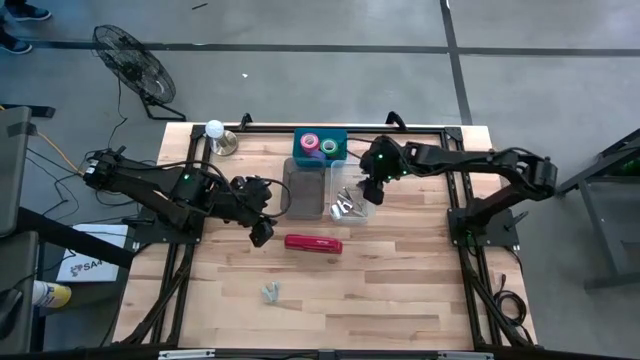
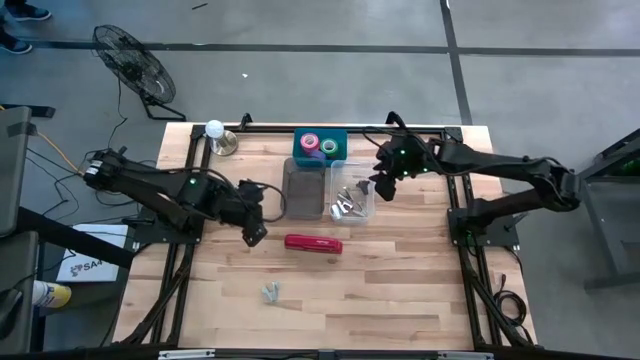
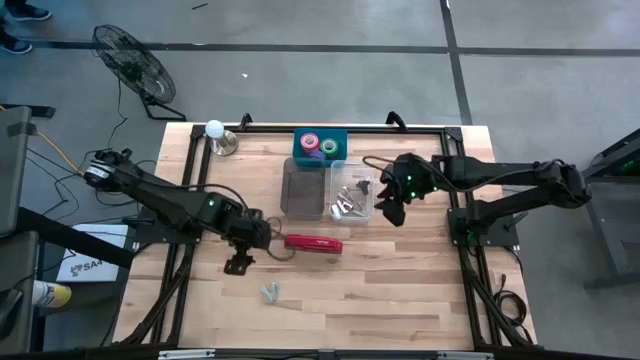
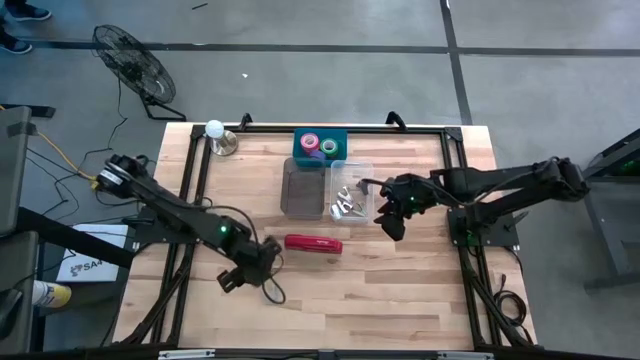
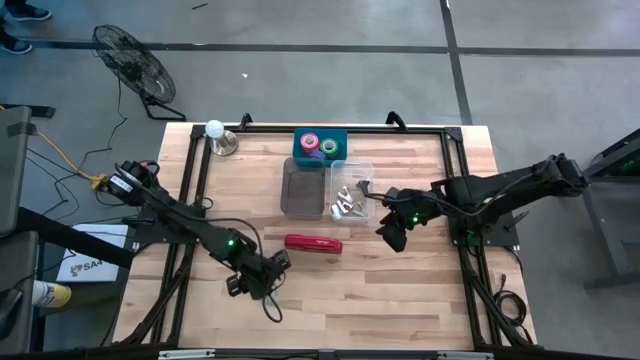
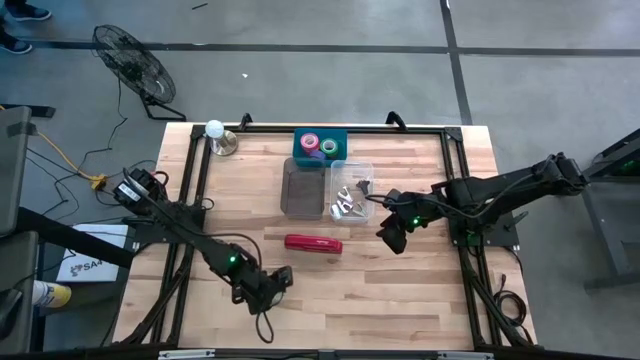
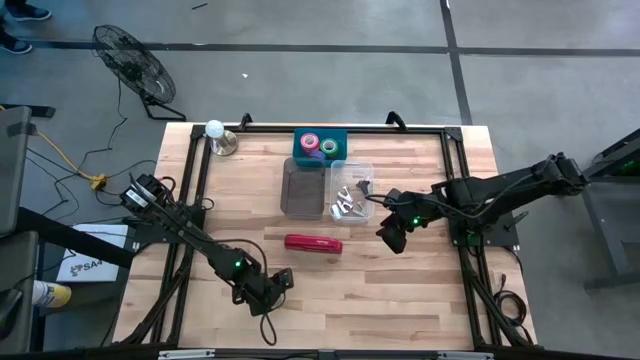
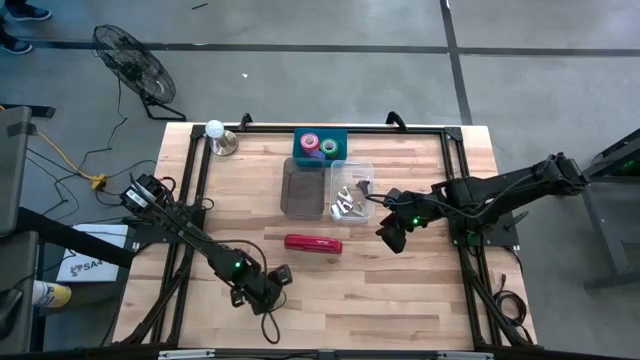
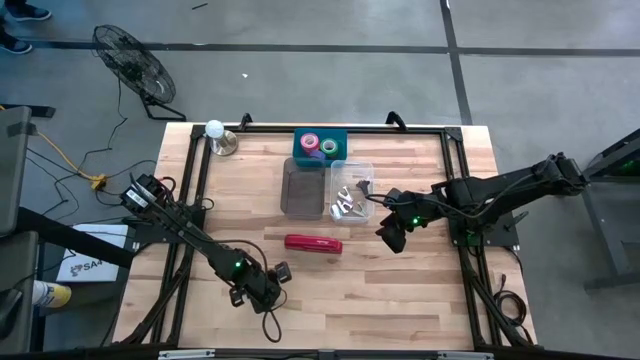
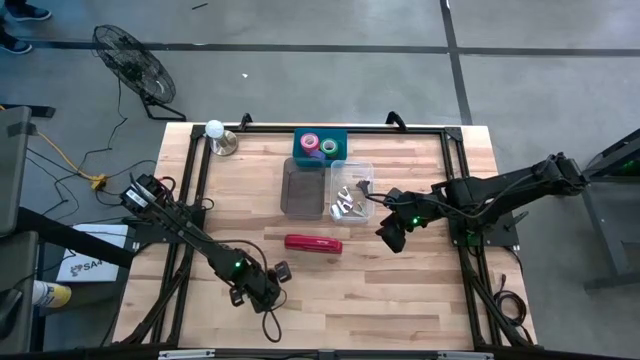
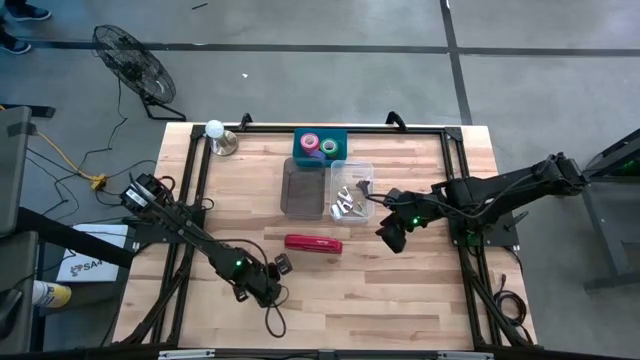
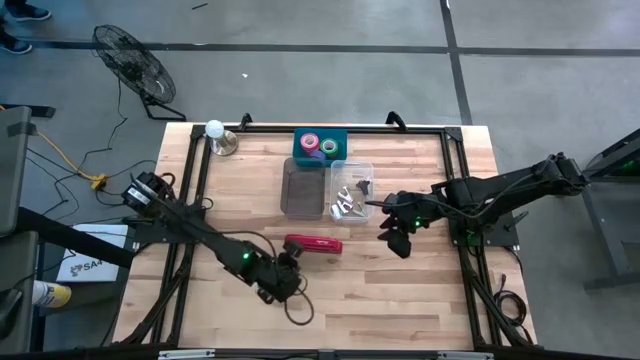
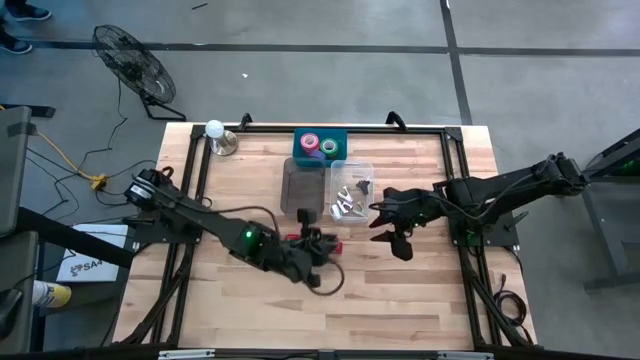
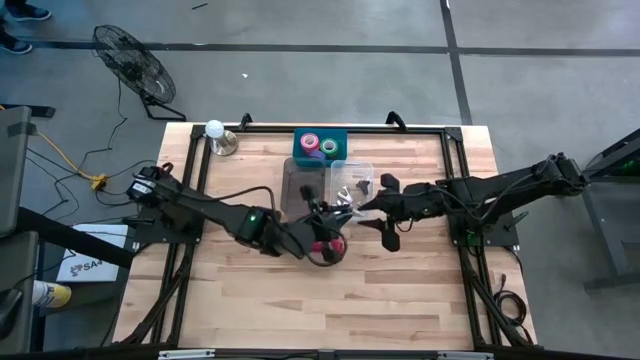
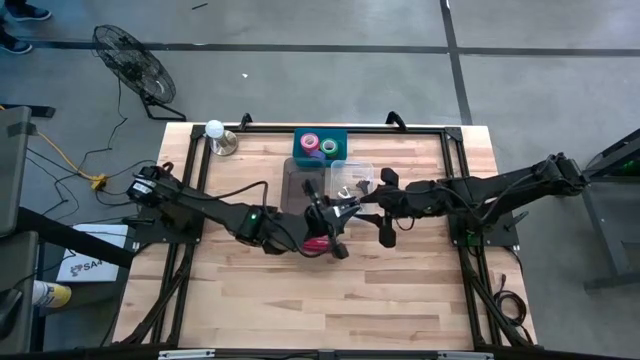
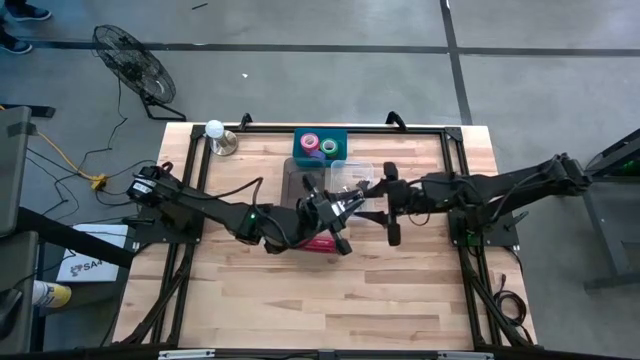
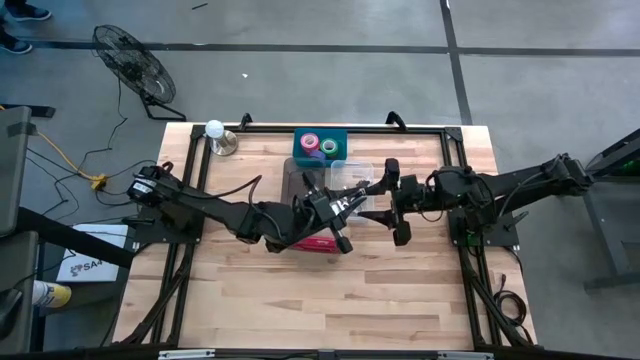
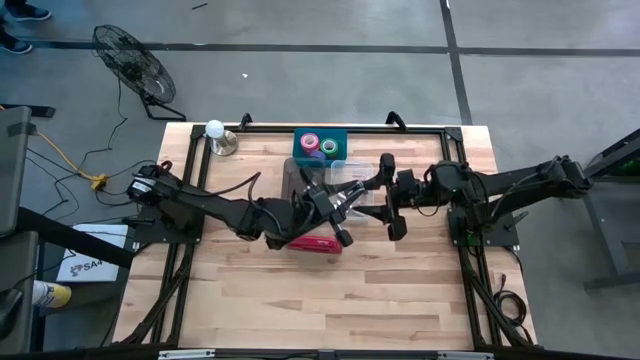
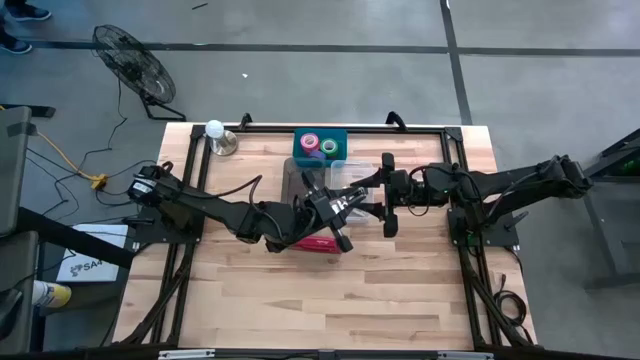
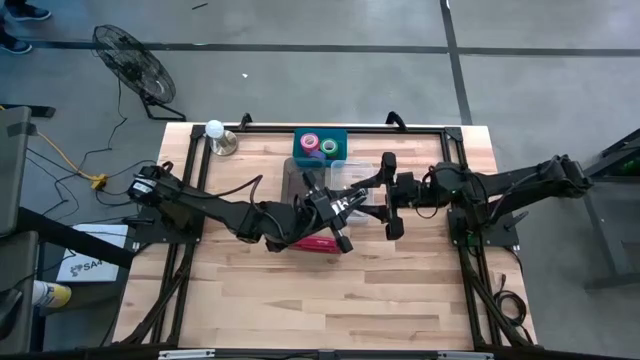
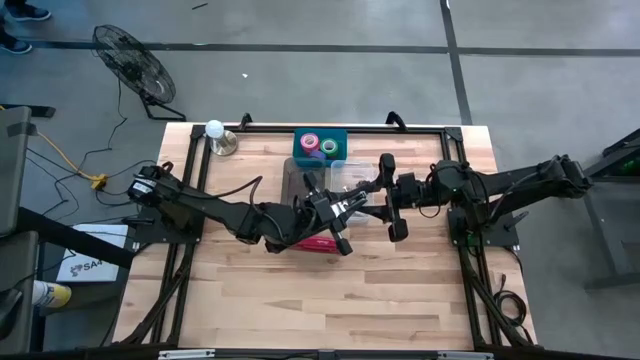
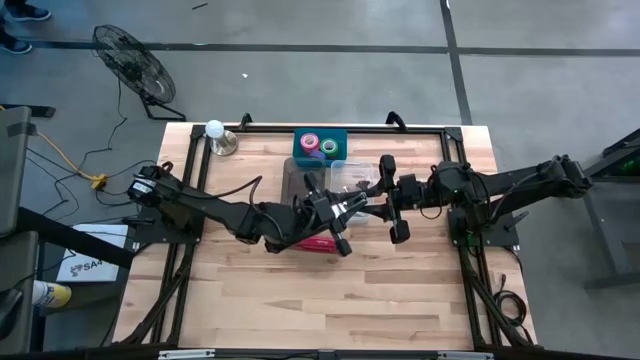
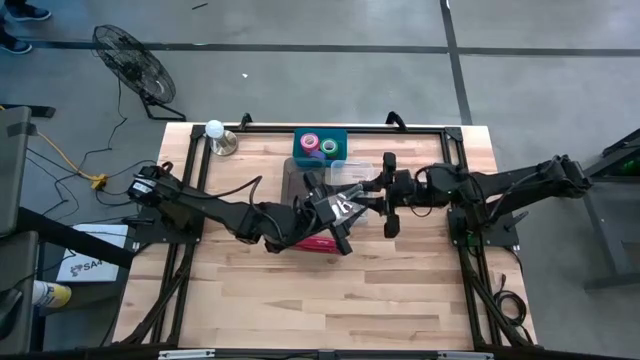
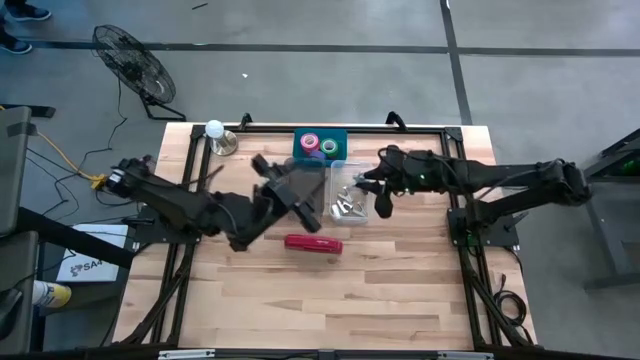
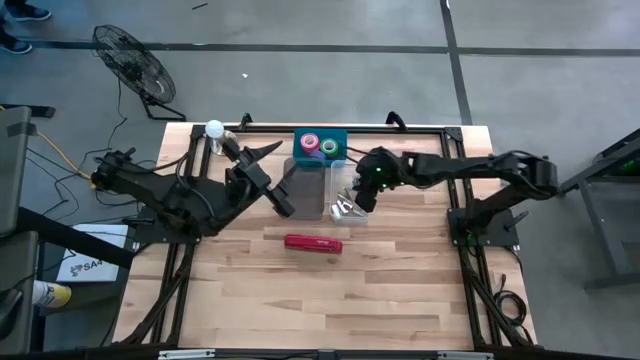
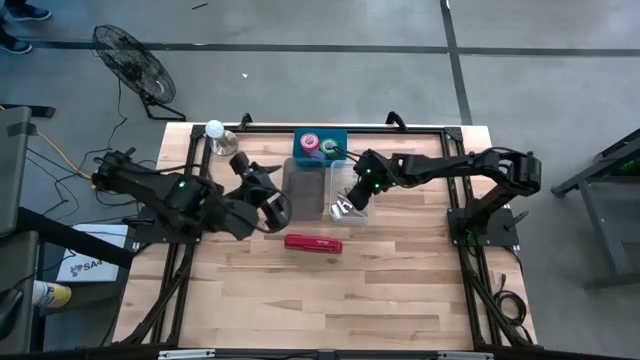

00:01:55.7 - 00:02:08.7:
Task: Pick and place Stapler, Stapler remover, tape
Put the blue staple remover into the transparent bin

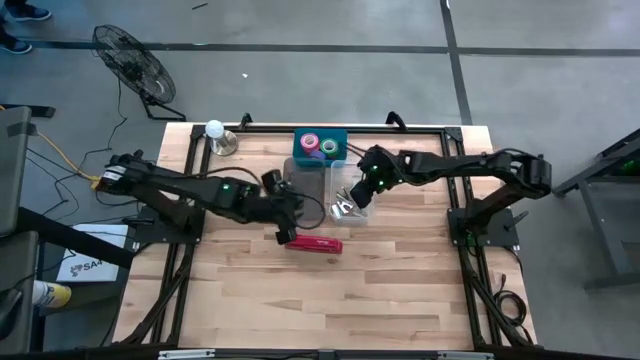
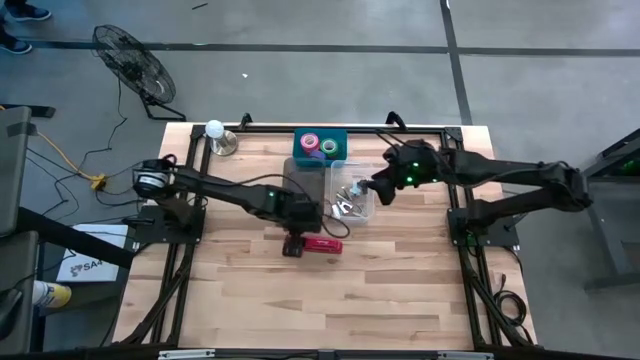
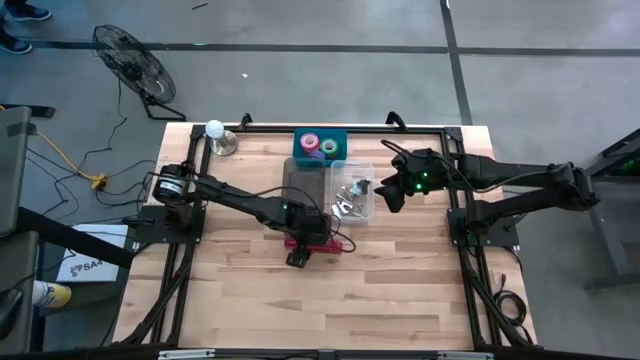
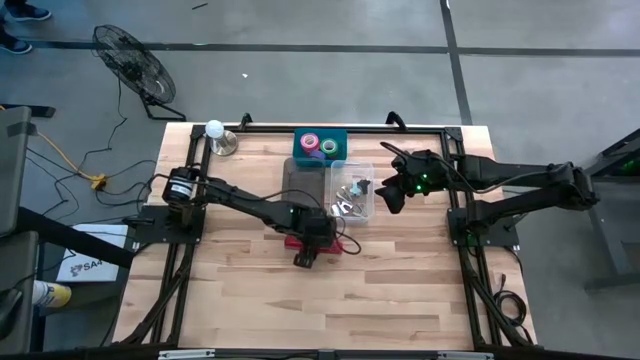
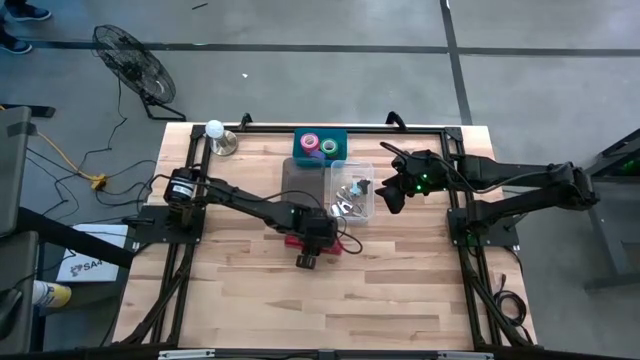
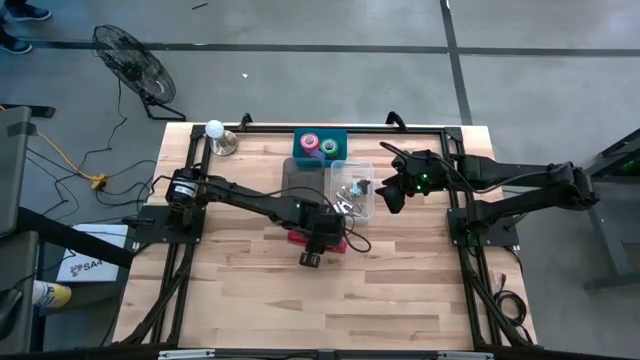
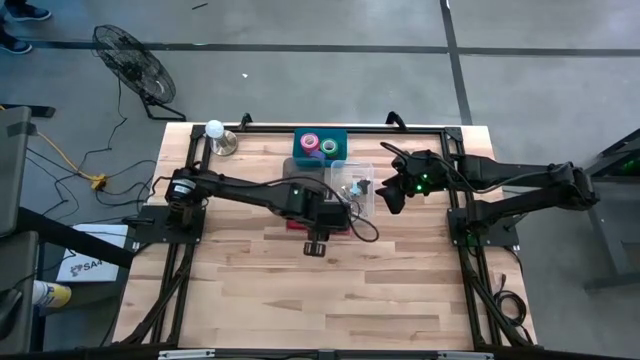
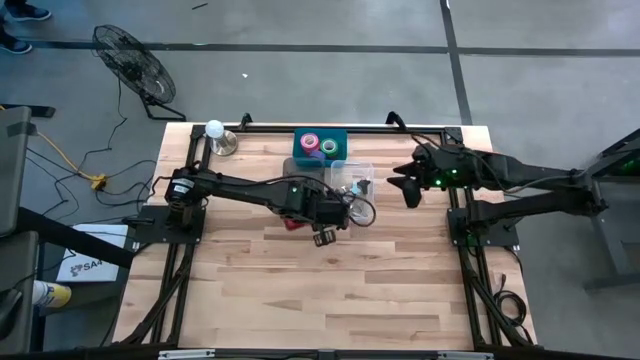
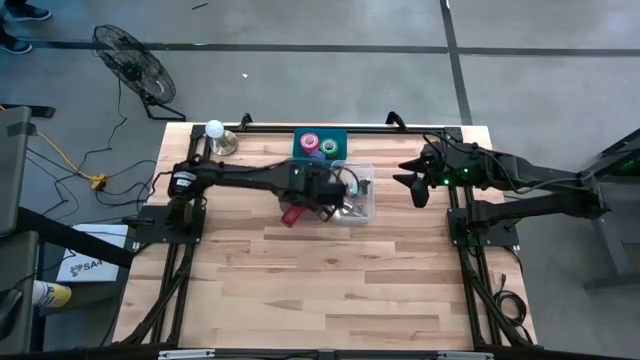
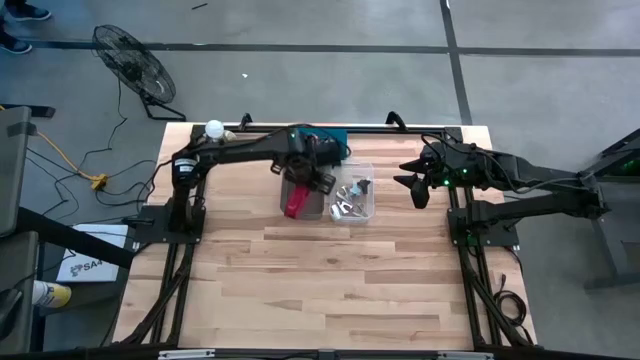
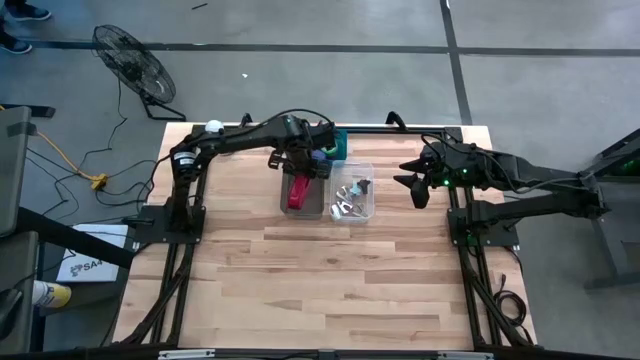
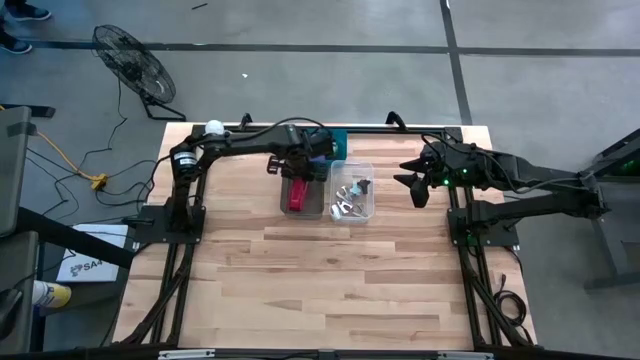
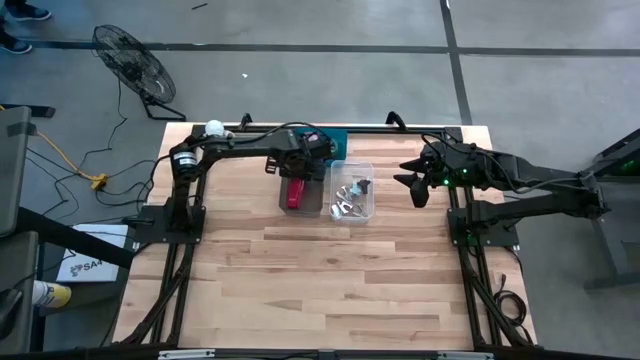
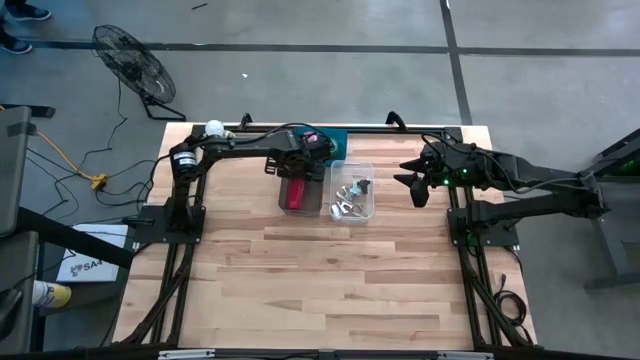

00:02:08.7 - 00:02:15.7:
Put the red stapler into the black bin

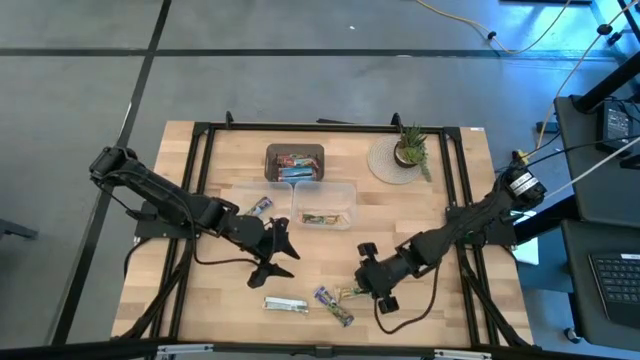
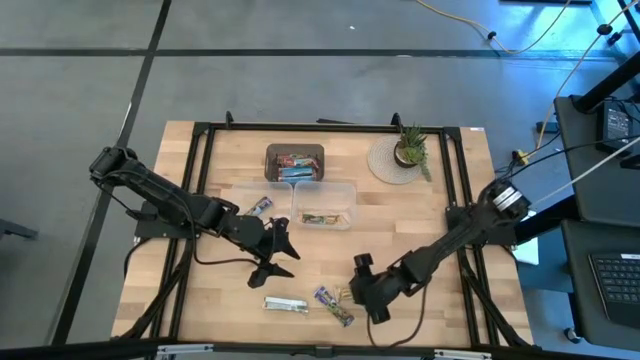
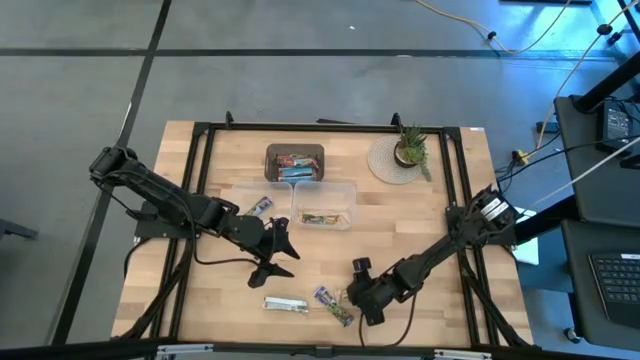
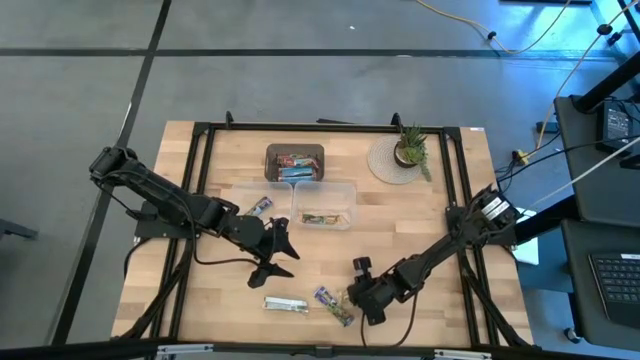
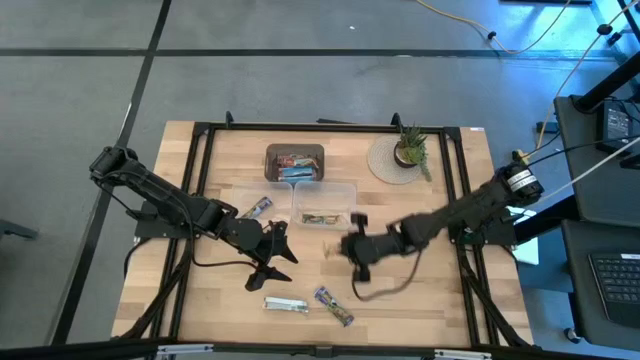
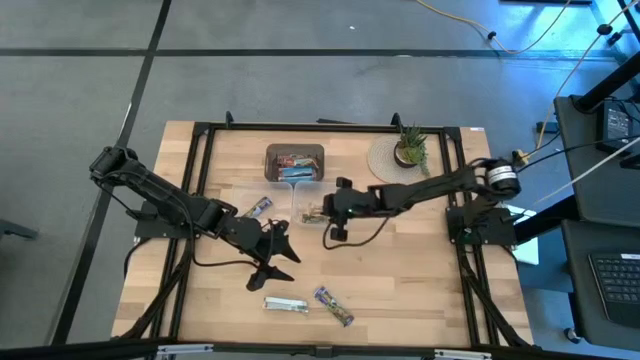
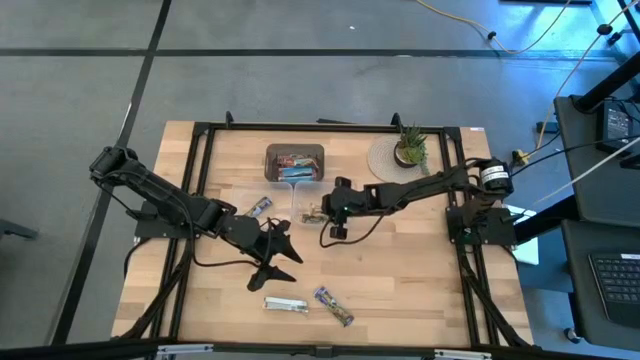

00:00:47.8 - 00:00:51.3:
Task: Pick and place Granola Bars by type
Put the yellow granola bar into the right transparent bin
